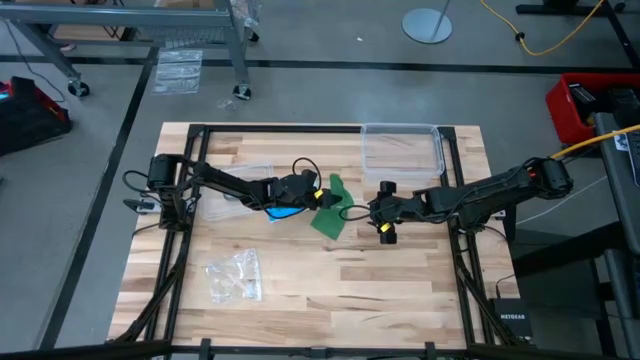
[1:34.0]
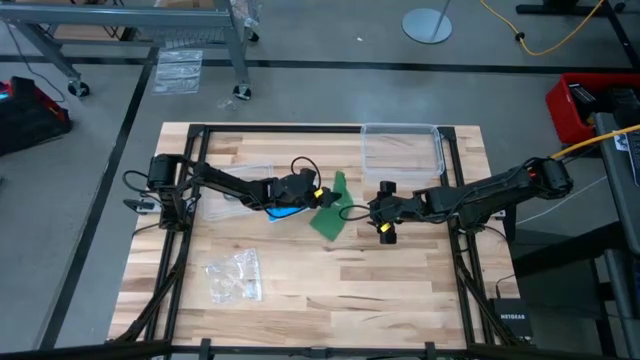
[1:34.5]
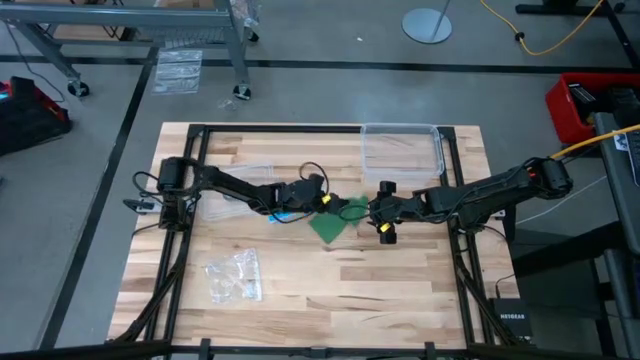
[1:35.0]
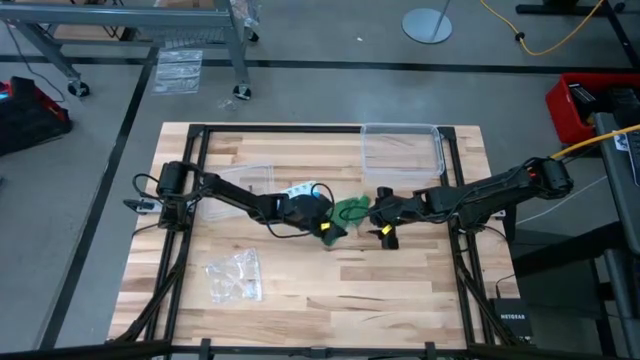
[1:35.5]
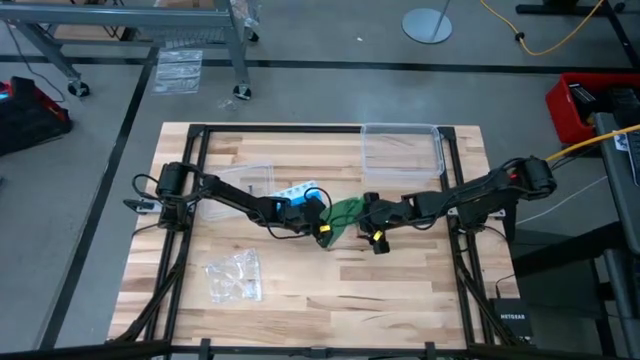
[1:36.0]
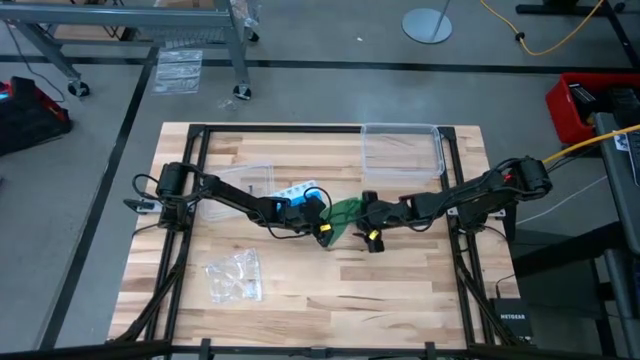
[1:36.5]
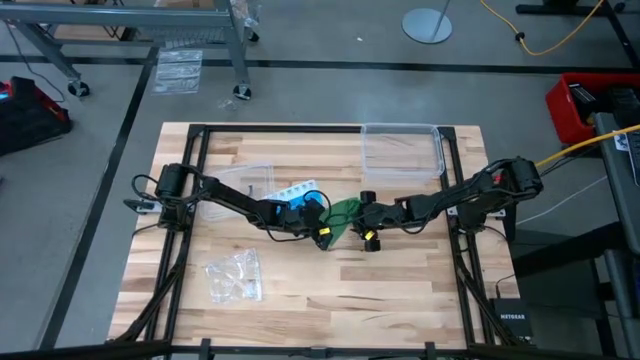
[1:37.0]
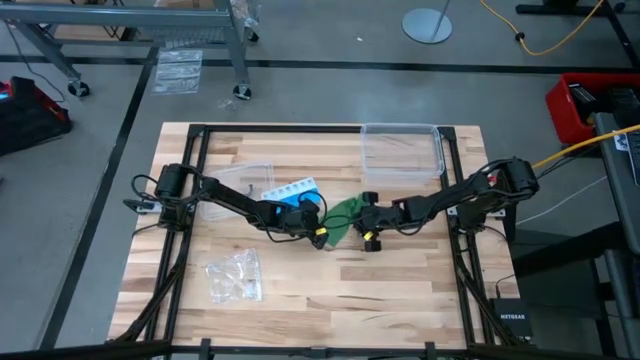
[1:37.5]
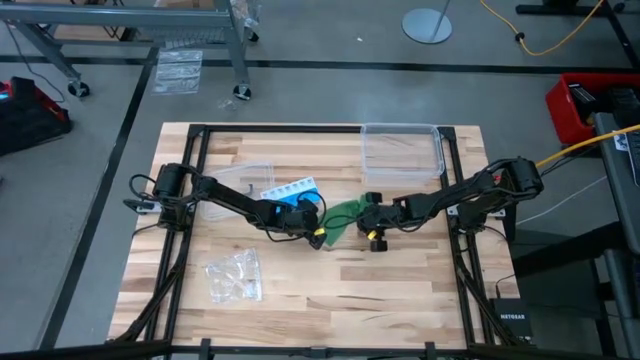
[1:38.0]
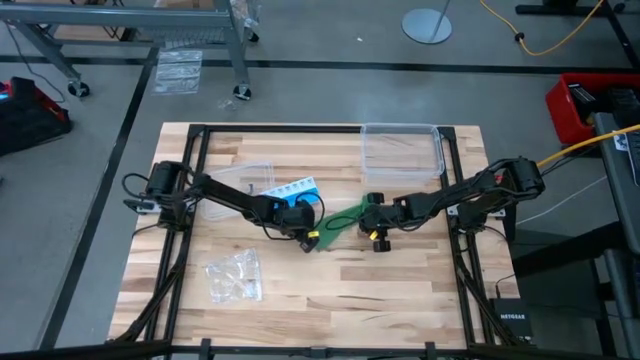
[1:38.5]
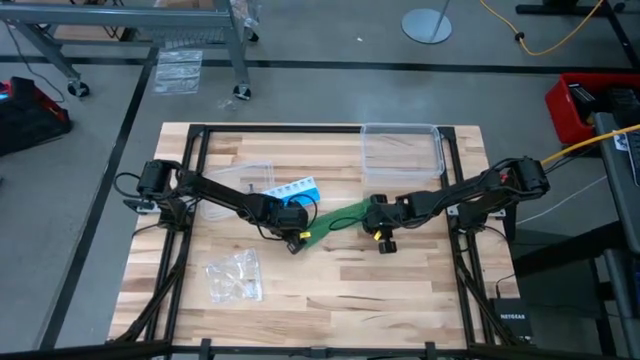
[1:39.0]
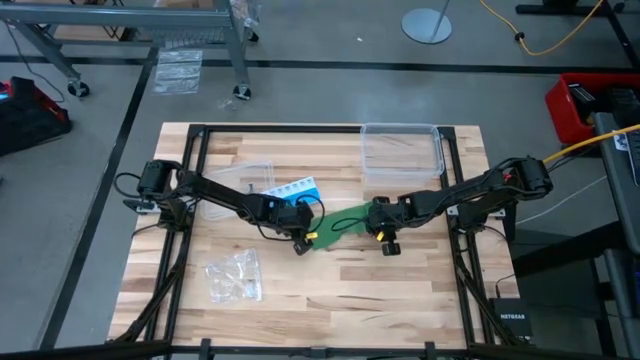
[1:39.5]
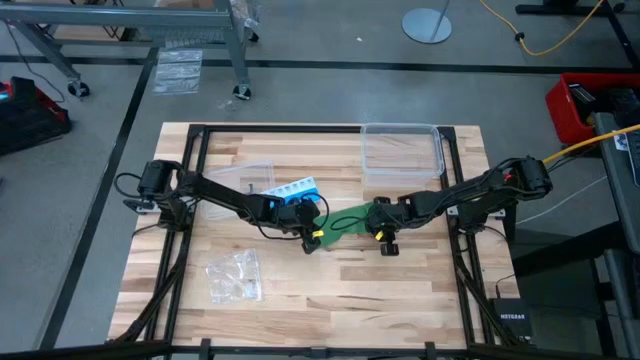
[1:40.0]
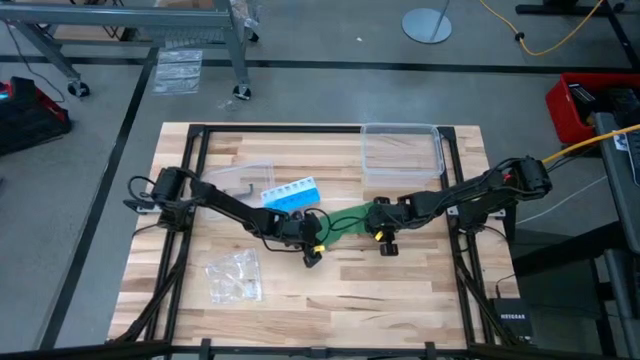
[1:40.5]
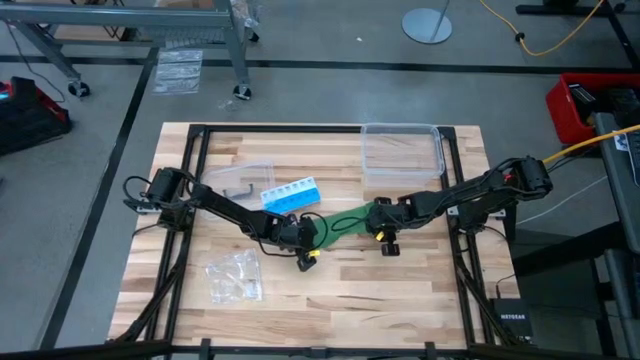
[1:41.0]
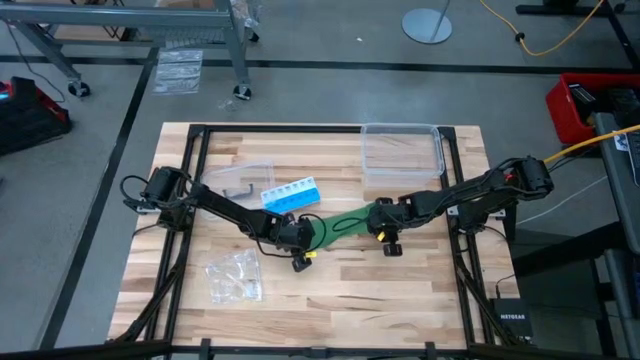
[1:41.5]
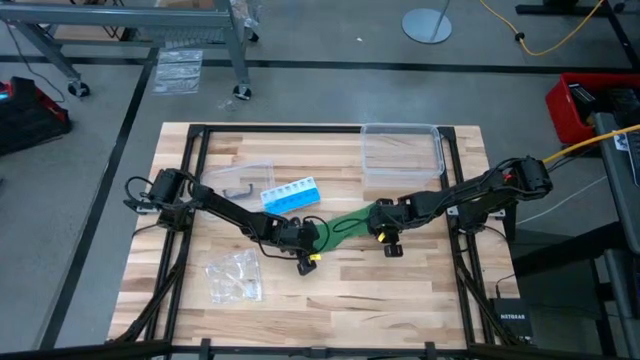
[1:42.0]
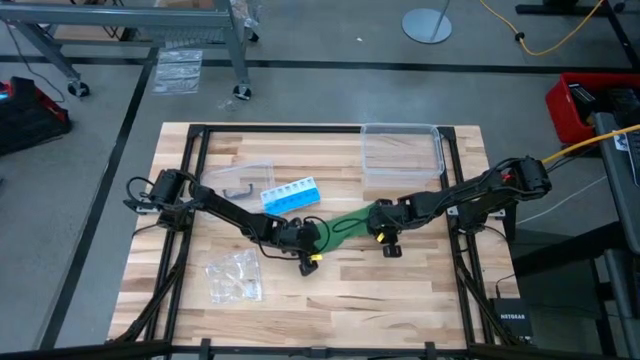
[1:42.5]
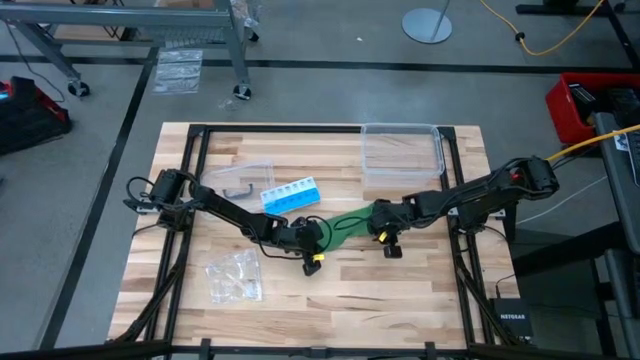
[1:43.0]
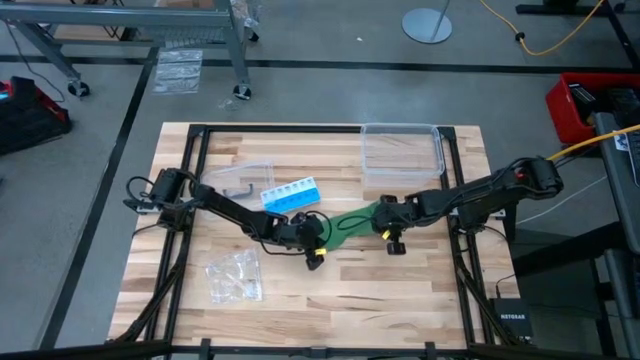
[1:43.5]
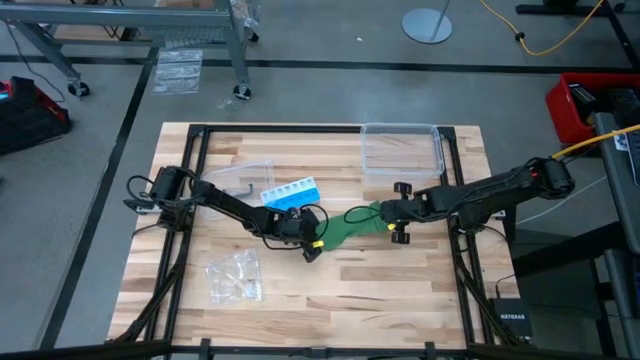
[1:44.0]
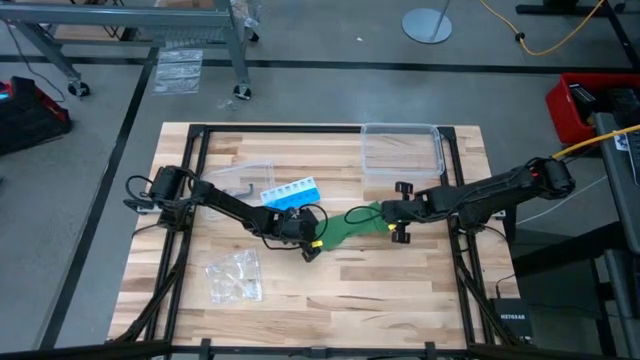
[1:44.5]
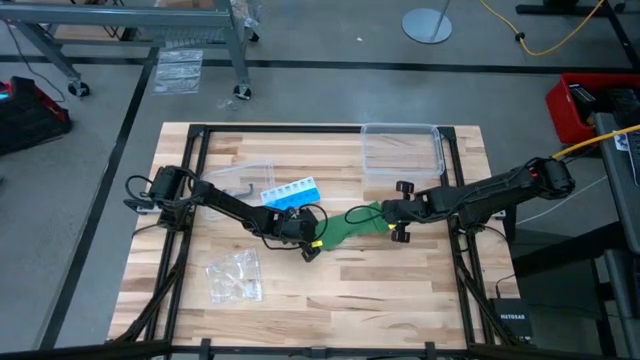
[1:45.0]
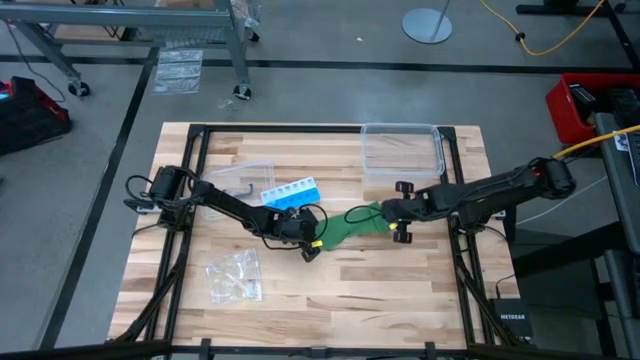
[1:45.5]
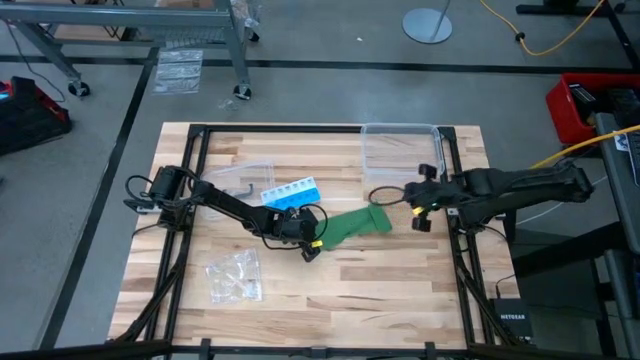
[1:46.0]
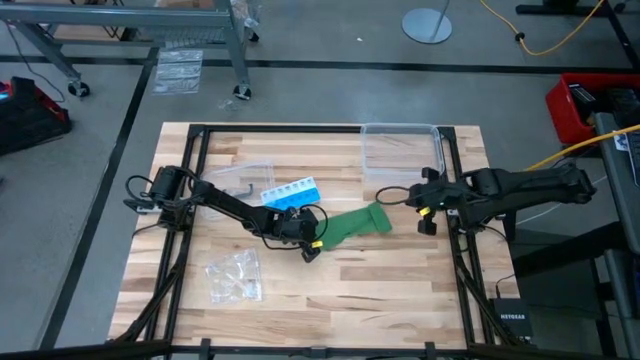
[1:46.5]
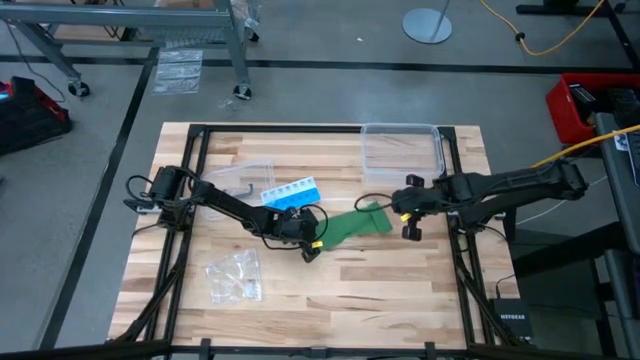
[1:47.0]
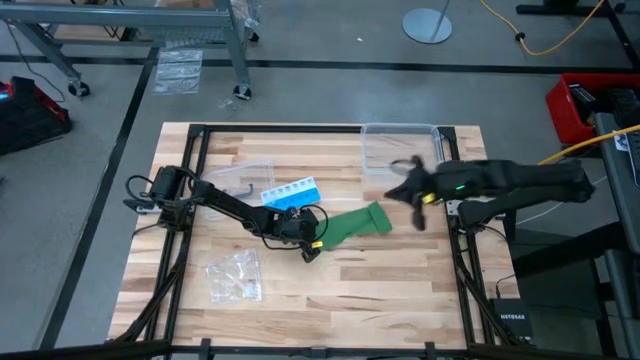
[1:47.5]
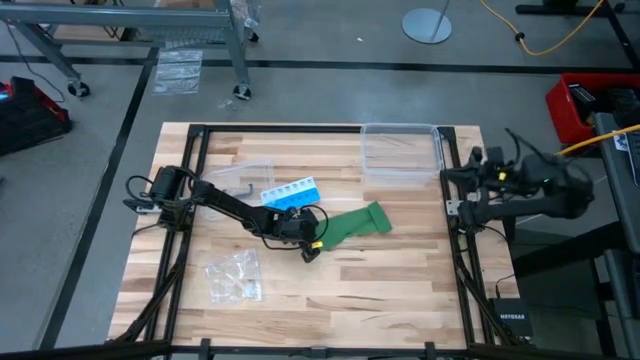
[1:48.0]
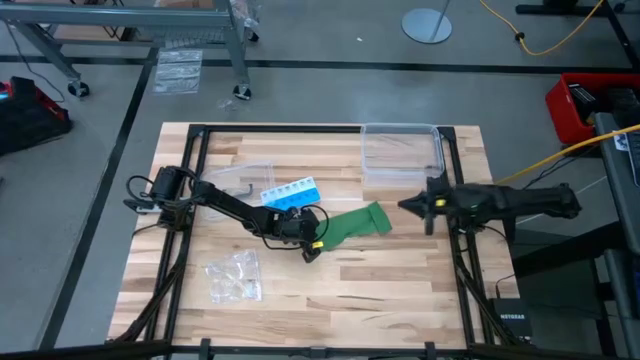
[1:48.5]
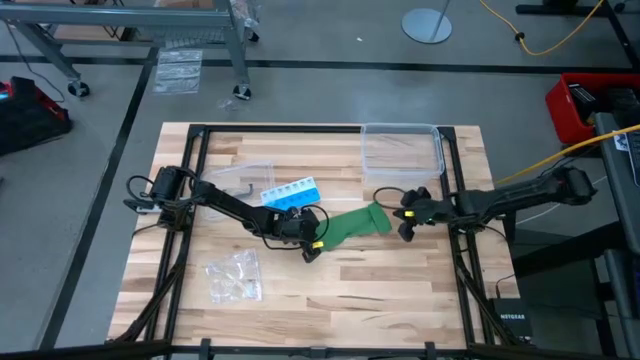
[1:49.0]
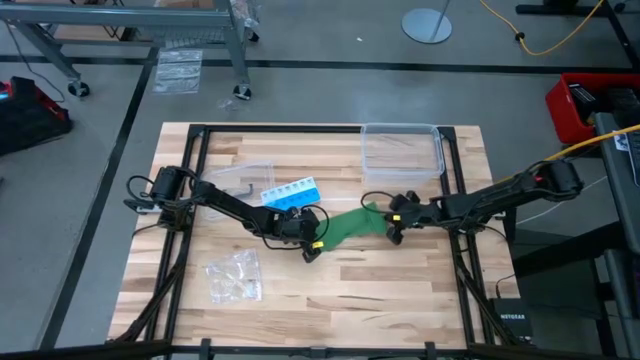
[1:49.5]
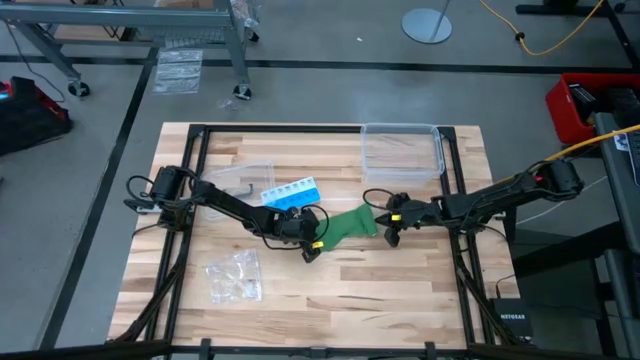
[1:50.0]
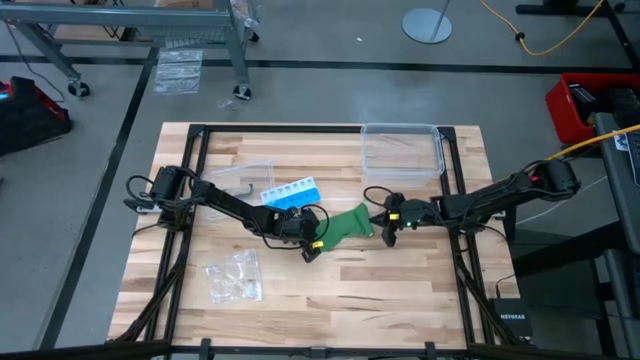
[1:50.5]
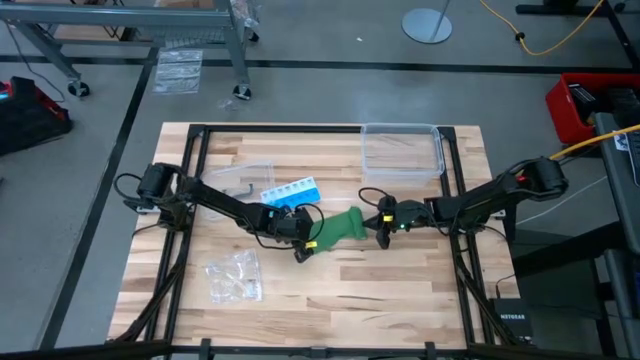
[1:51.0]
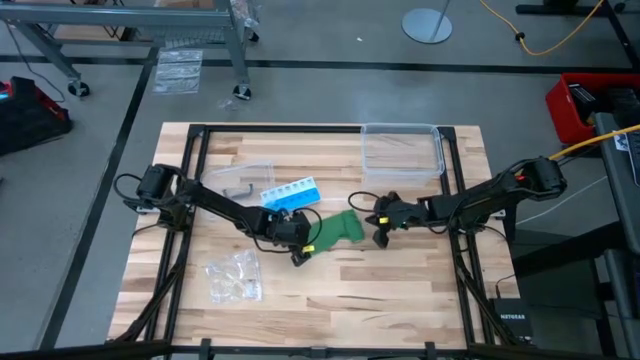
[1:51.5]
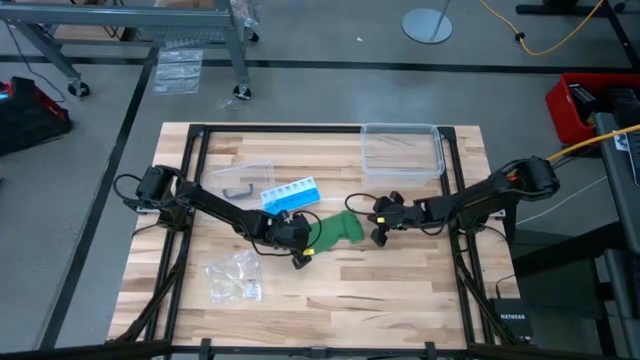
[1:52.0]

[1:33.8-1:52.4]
Task: Roll bandage
Roll the green bandage

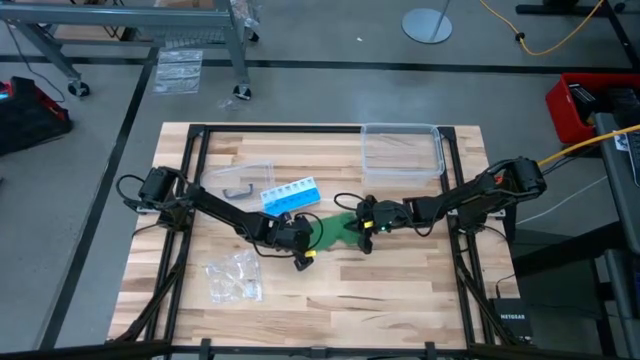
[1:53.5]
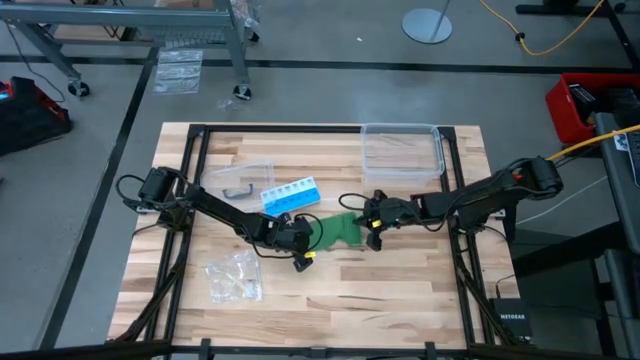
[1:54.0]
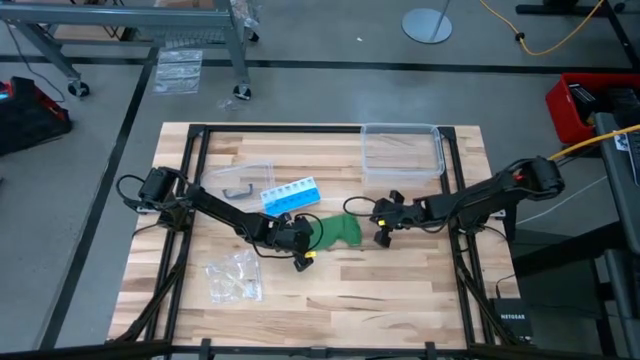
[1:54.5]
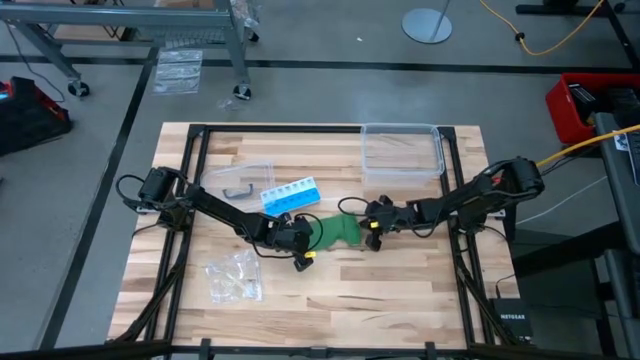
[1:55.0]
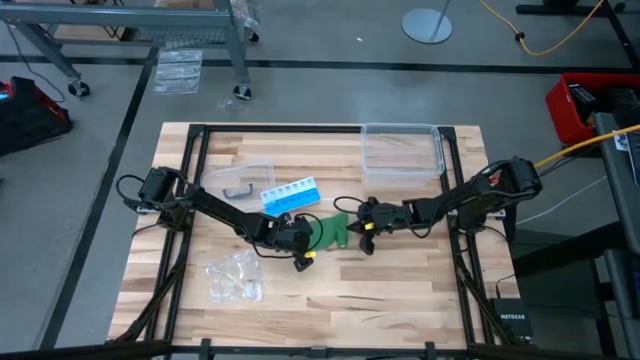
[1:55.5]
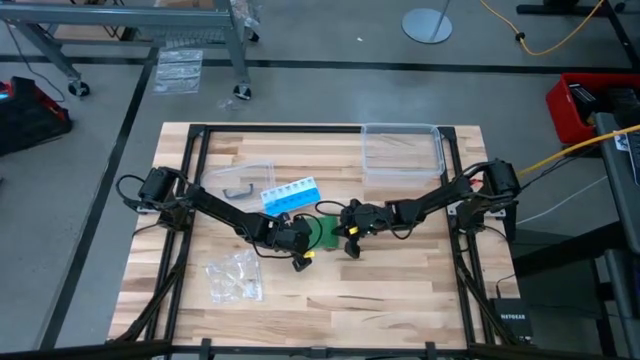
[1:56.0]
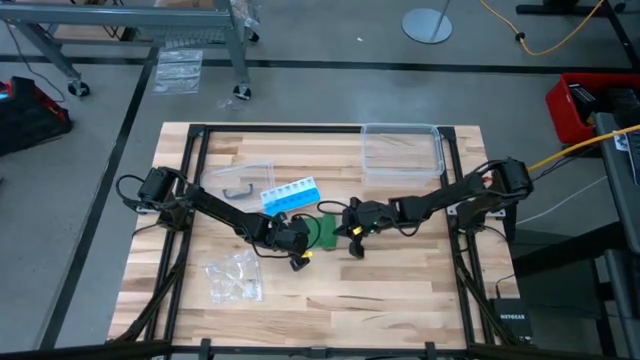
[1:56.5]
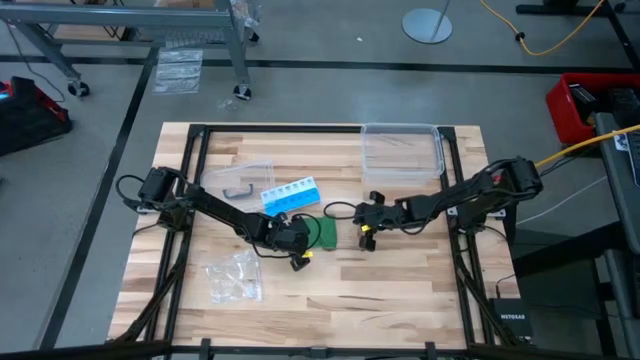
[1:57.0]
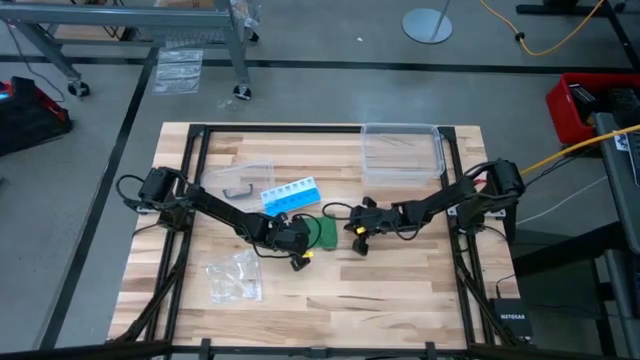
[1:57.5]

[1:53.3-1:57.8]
Roll the green bandage

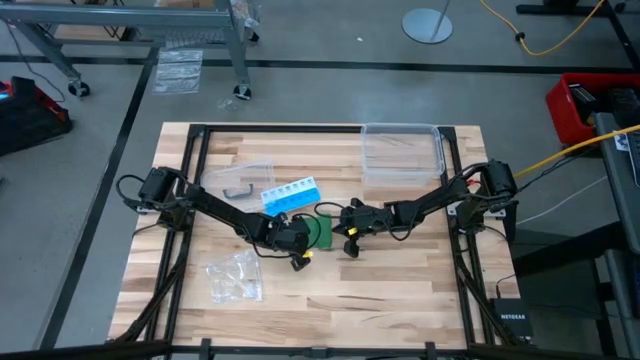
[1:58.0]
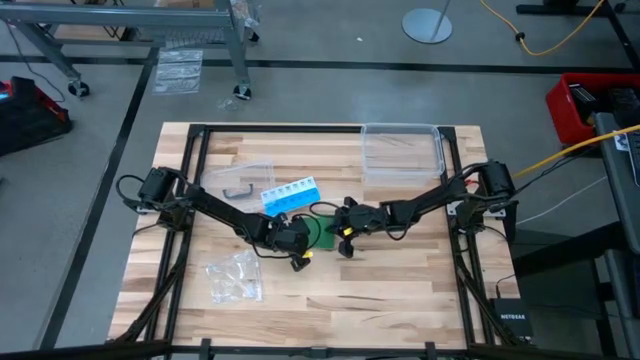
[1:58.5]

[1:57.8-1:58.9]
Roll the green bandage
